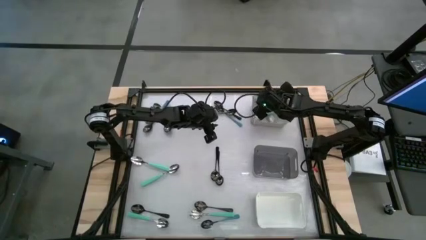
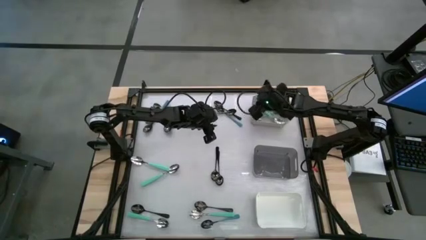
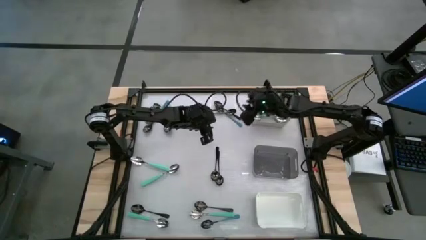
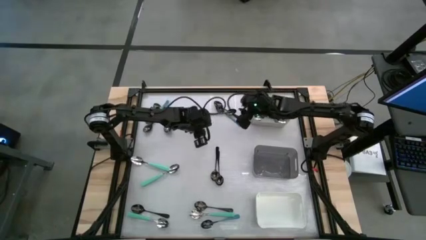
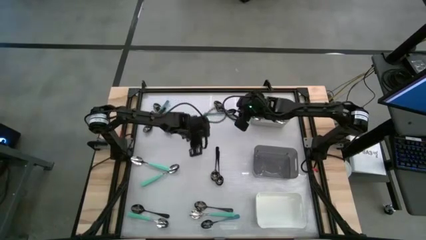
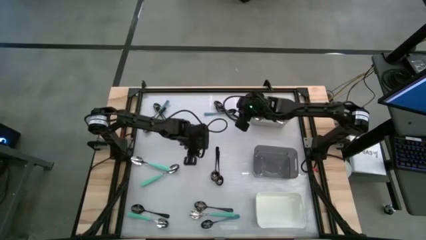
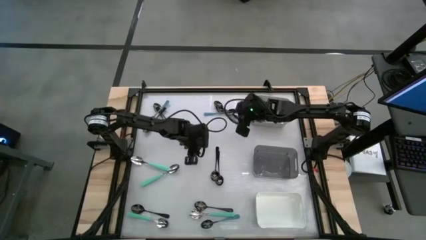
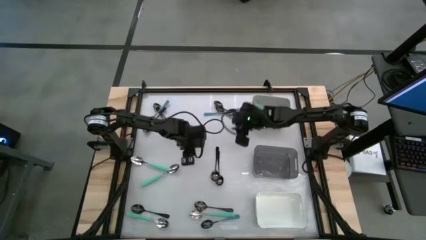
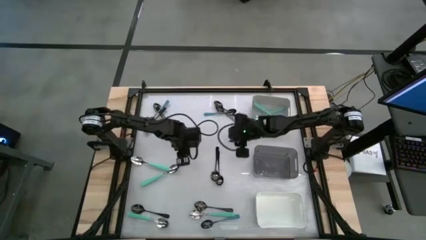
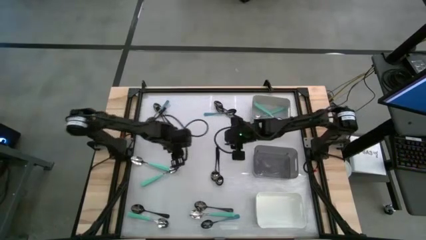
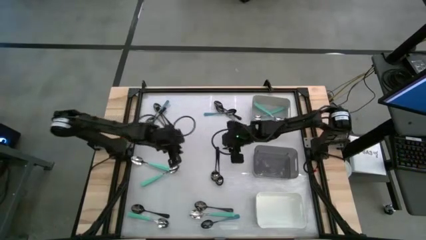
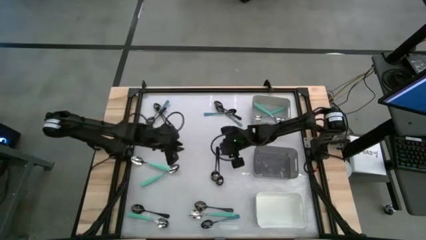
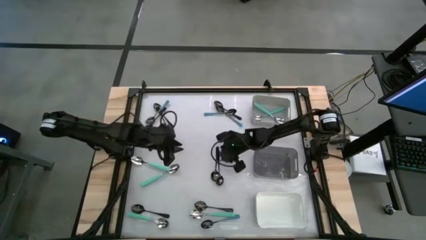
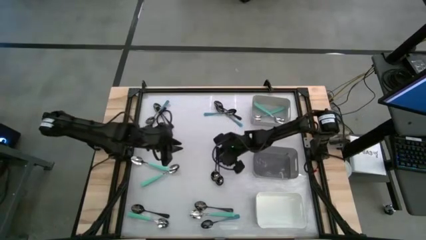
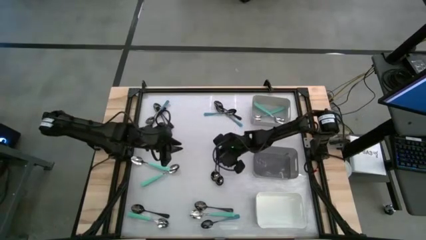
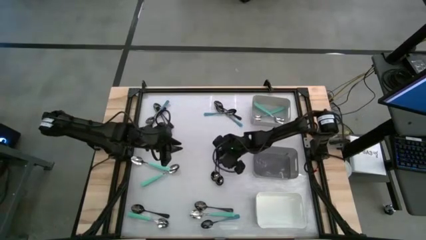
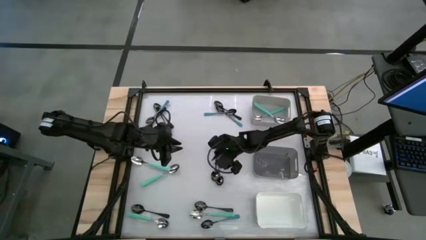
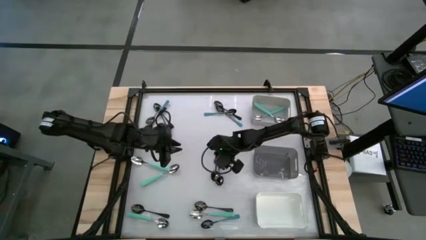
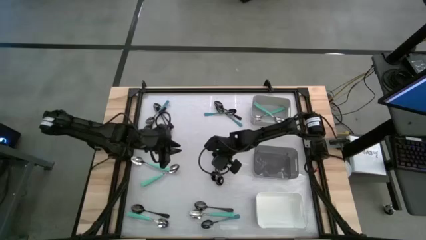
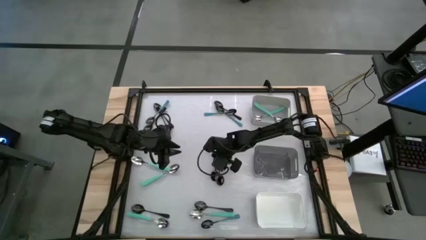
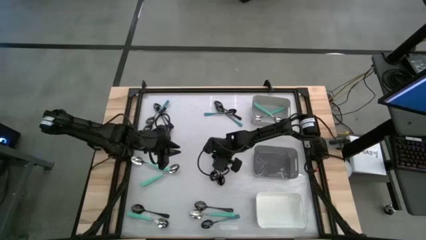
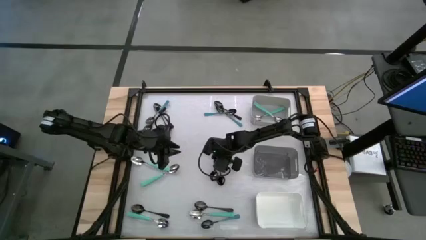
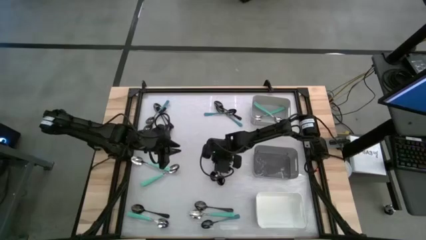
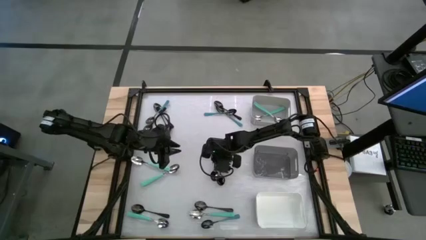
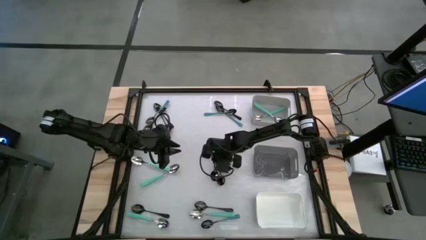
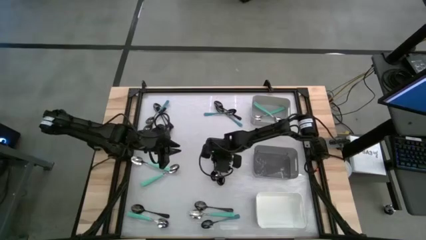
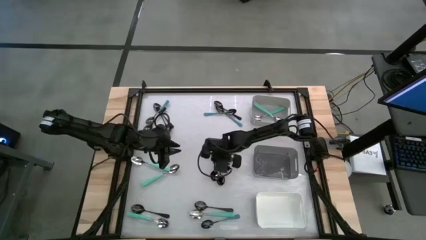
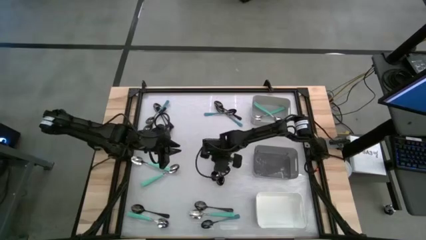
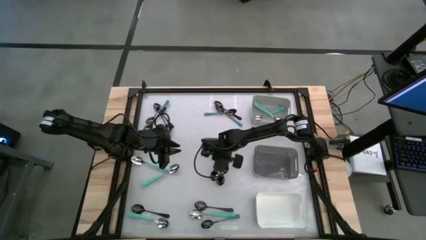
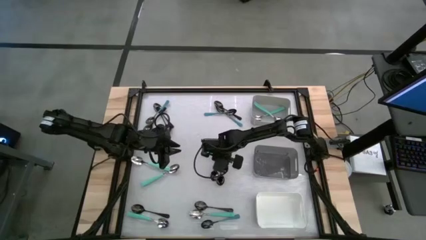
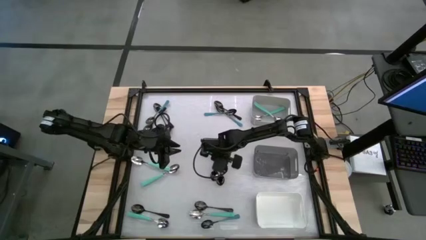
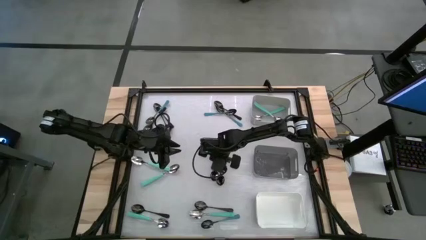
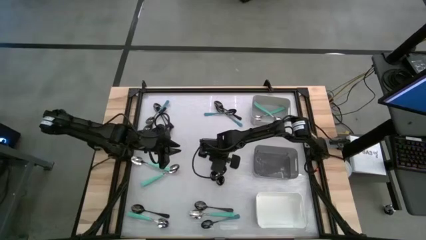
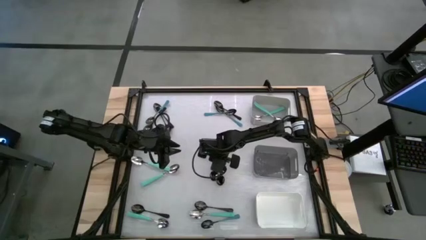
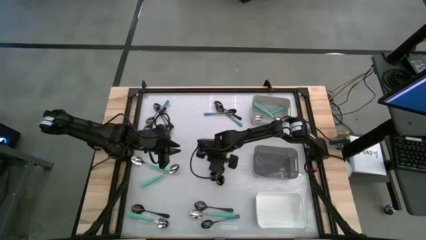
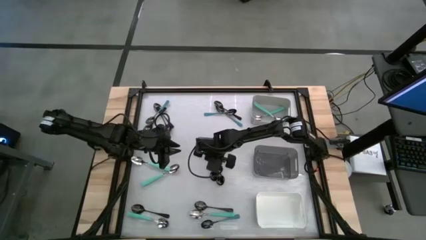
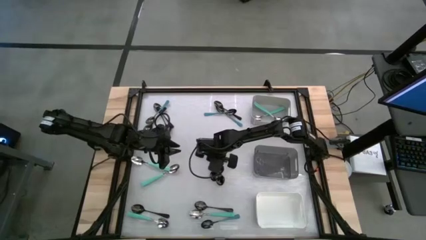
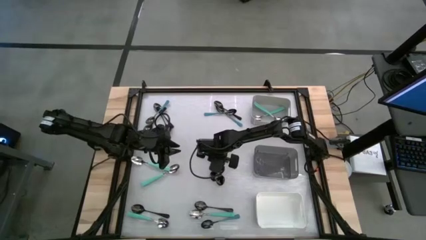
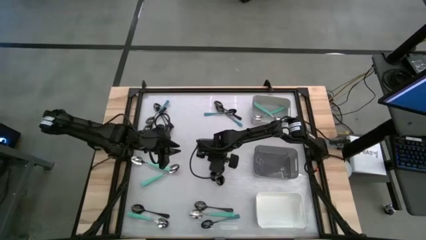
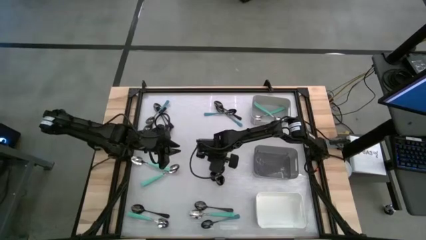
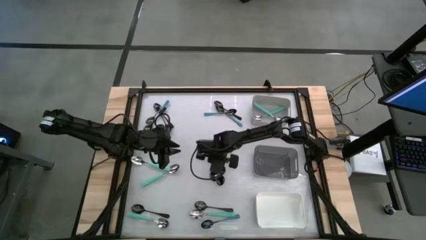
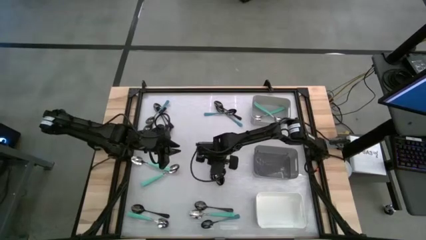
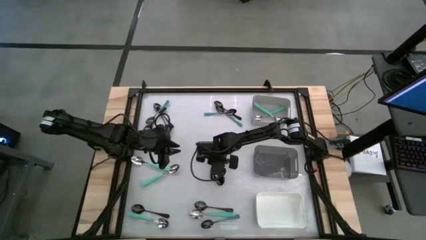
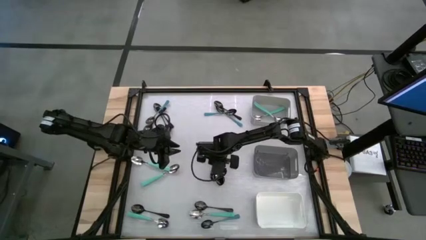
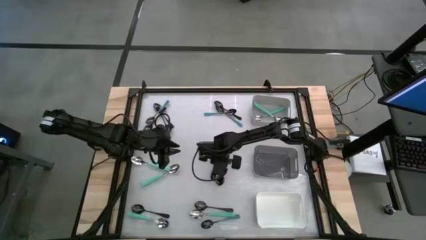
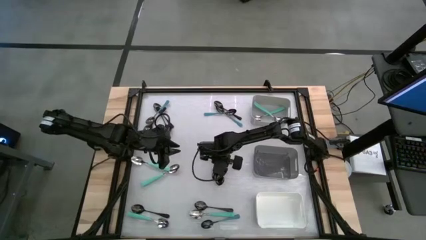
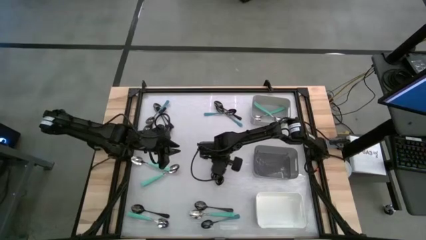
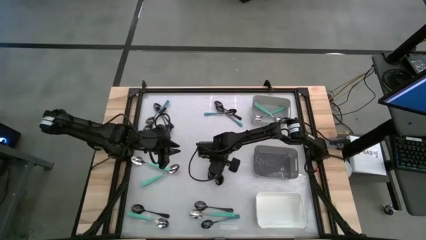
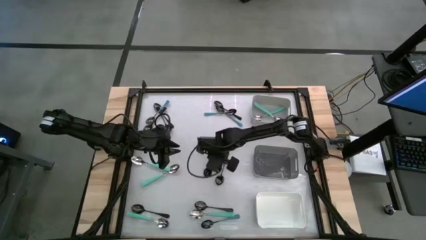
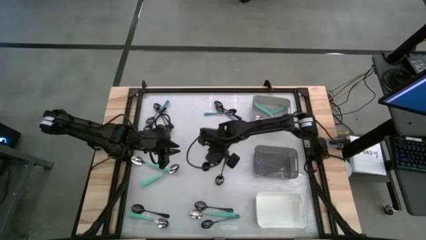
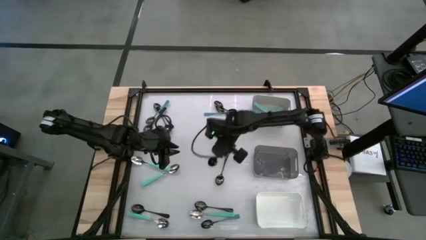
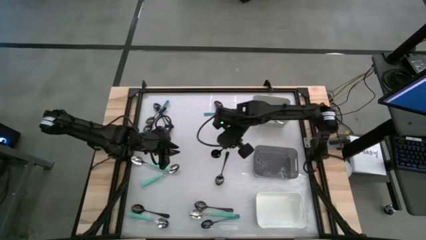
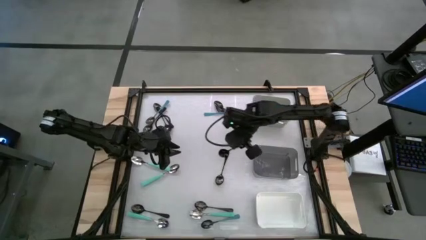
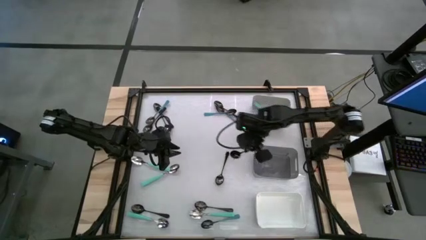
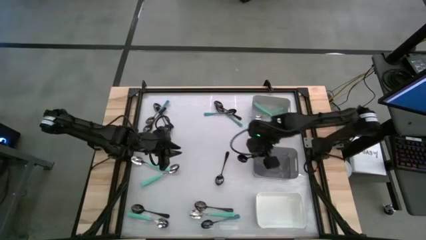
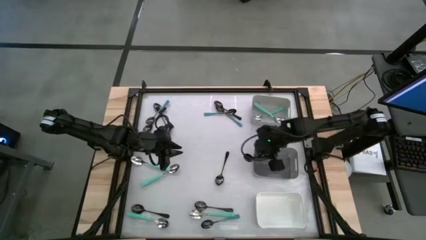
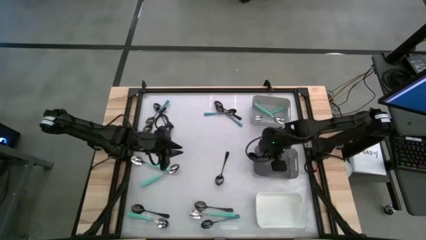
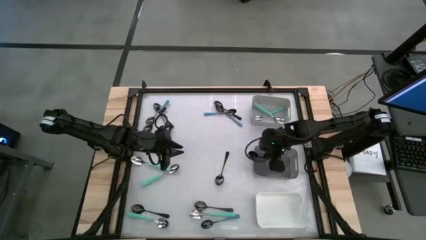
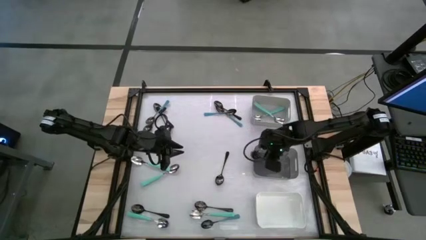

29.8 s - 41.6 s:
Task: Sort silverware by color (type)
Put the black spoon into the black bin

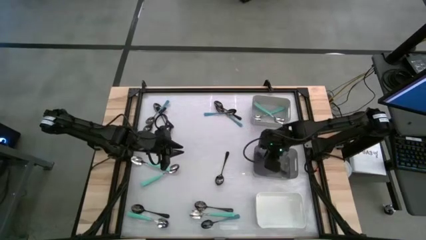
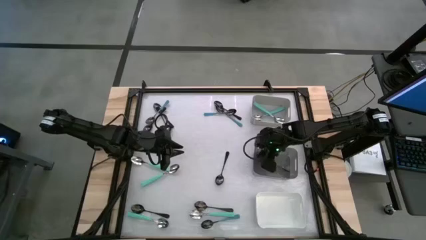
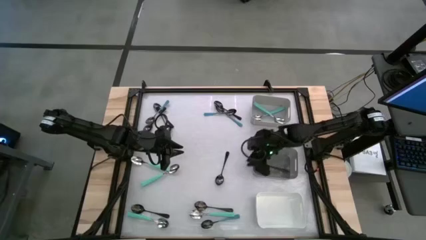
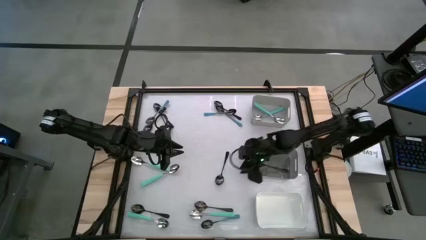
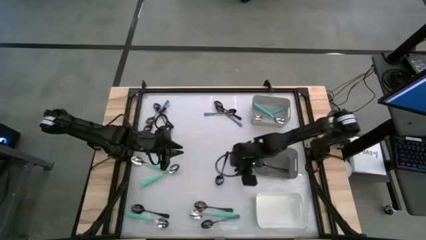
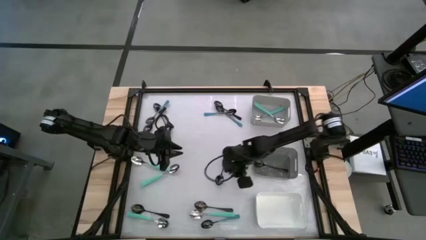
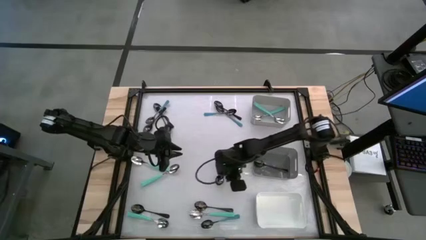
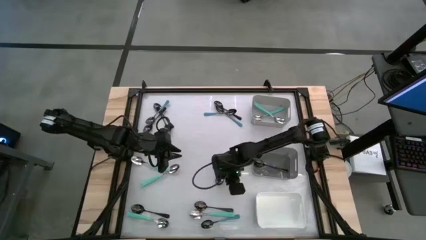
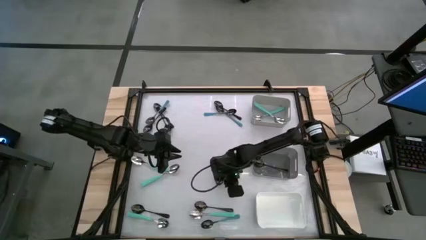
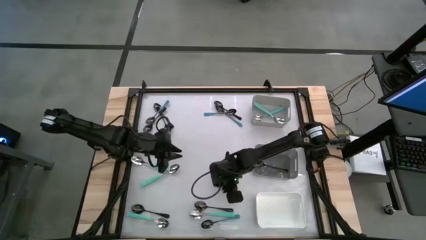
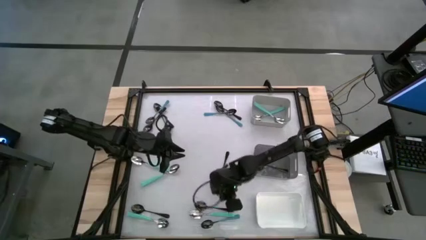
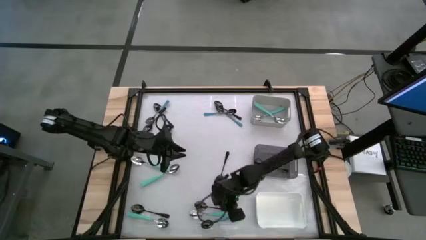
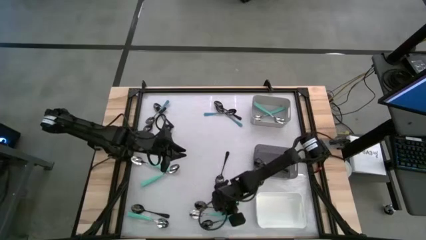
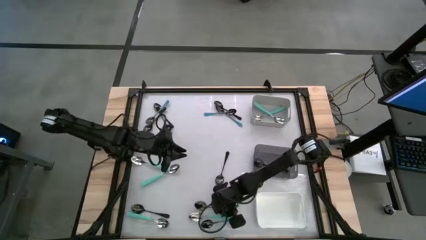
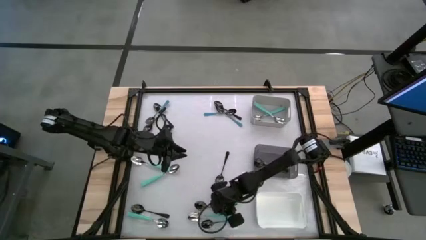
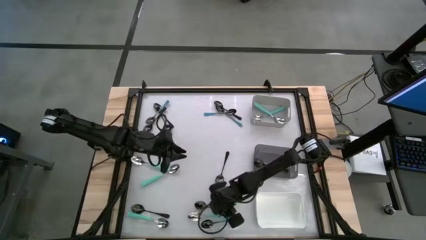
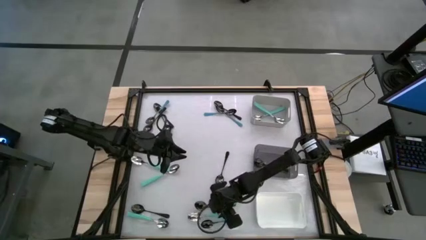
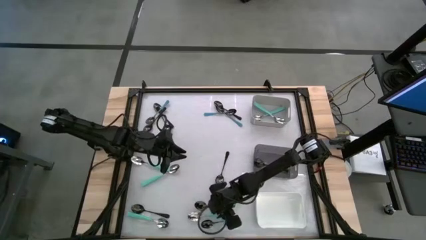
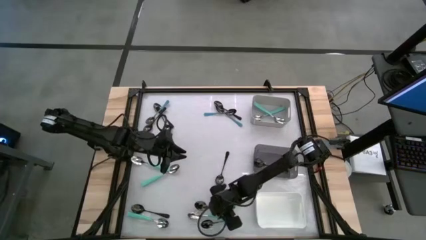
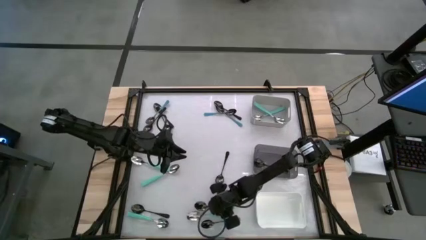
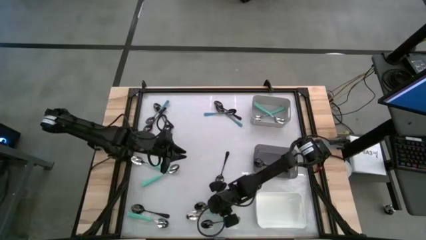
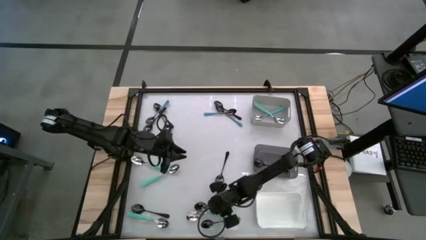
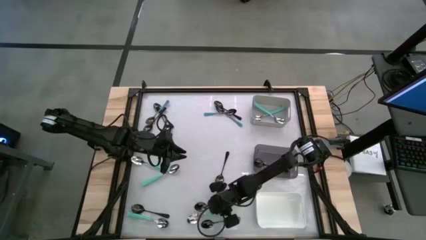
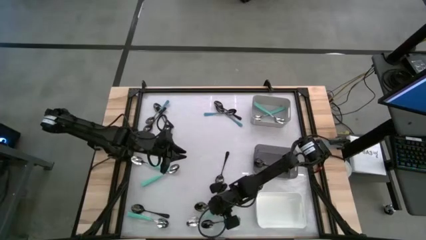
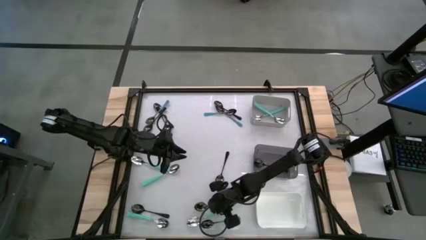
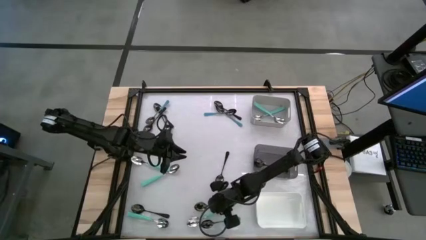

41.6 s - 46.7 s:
Put the light blue spoon into the gray bin
